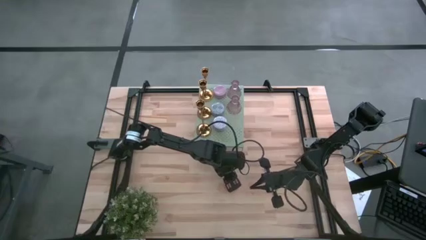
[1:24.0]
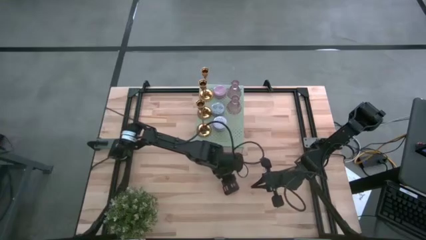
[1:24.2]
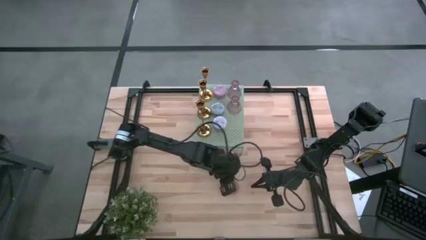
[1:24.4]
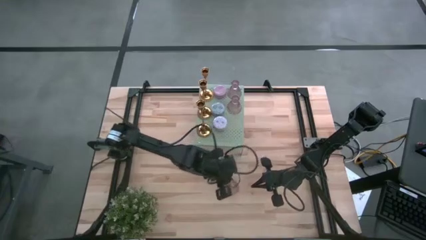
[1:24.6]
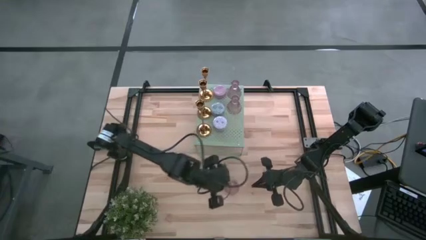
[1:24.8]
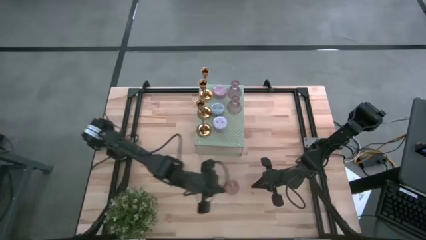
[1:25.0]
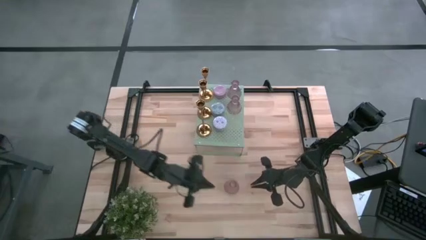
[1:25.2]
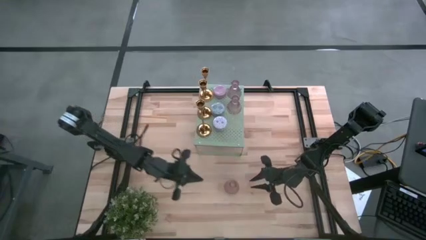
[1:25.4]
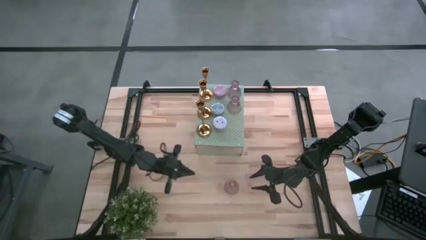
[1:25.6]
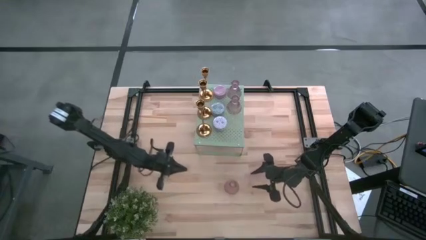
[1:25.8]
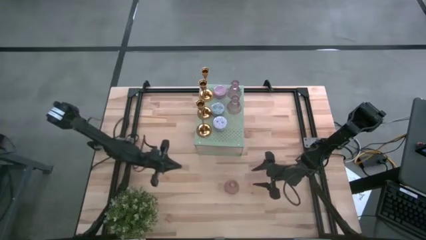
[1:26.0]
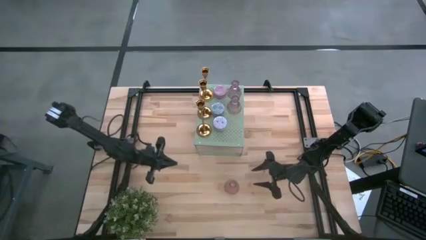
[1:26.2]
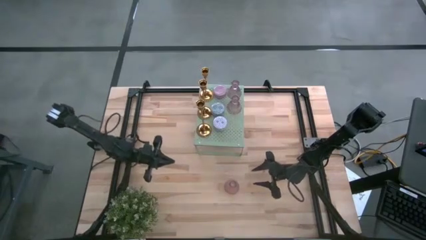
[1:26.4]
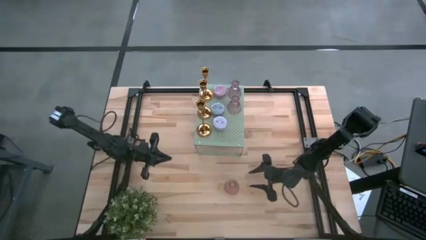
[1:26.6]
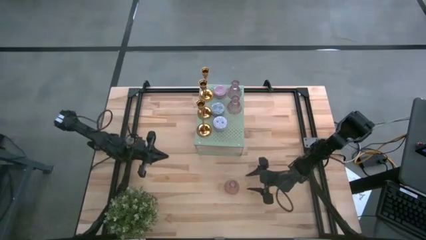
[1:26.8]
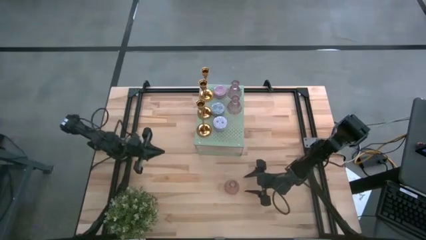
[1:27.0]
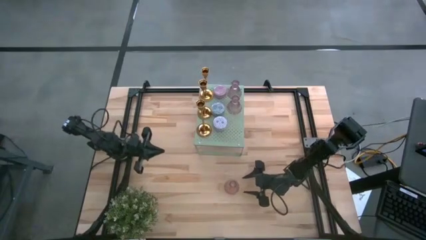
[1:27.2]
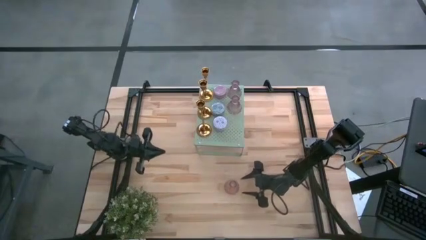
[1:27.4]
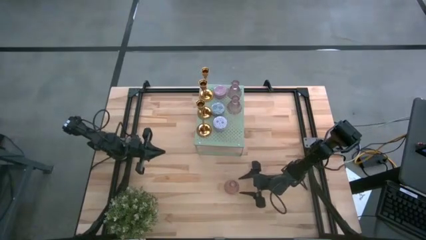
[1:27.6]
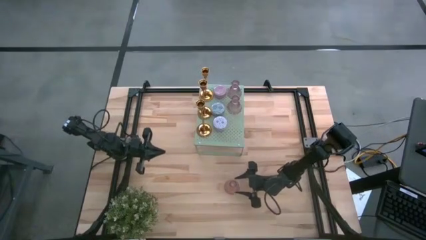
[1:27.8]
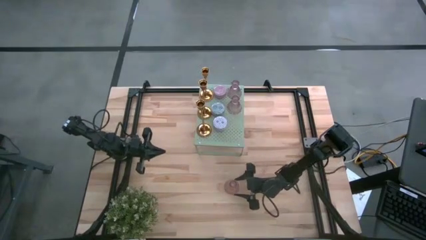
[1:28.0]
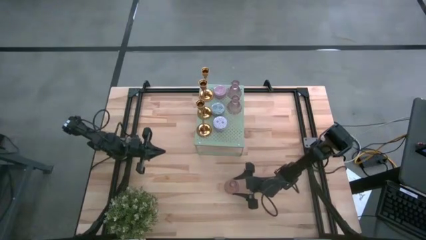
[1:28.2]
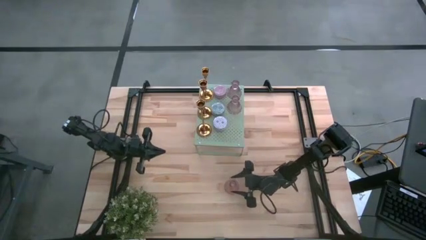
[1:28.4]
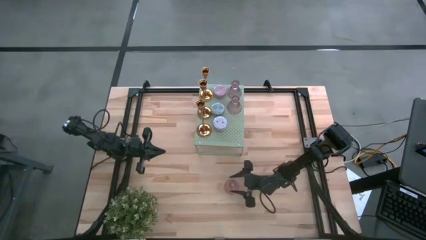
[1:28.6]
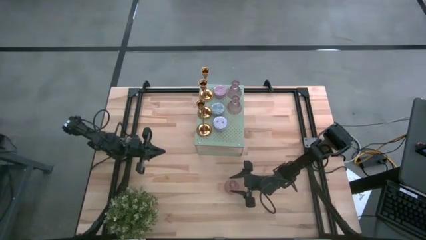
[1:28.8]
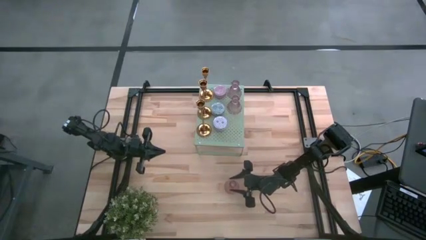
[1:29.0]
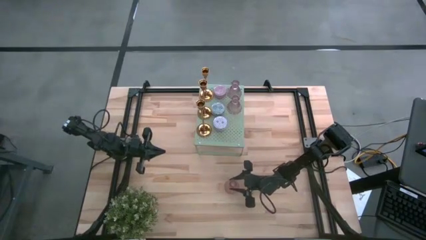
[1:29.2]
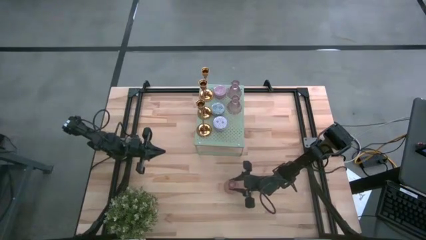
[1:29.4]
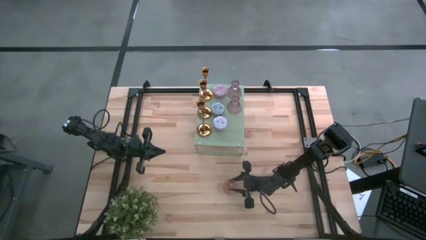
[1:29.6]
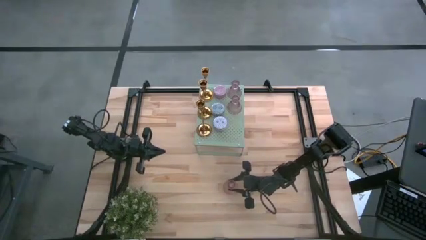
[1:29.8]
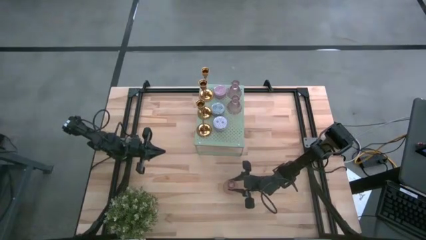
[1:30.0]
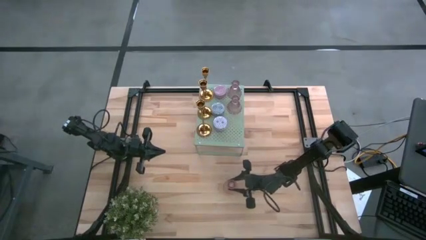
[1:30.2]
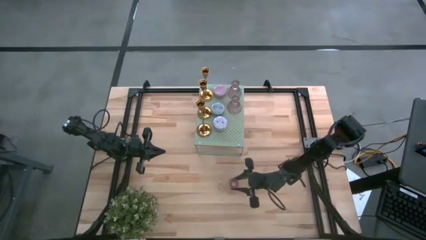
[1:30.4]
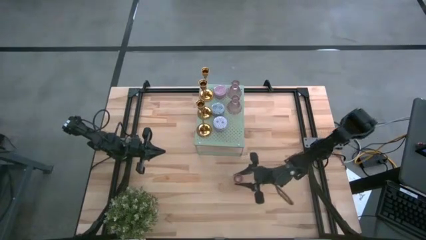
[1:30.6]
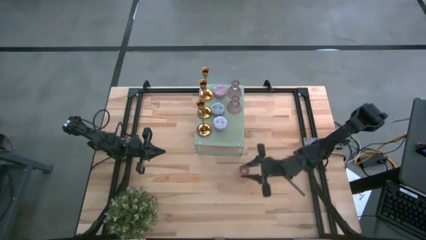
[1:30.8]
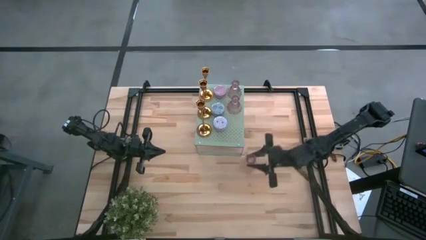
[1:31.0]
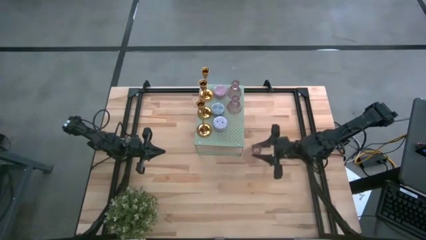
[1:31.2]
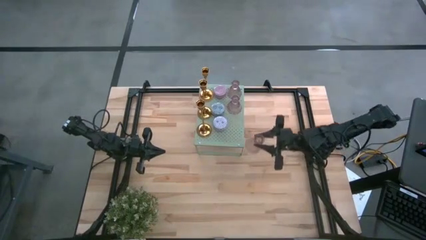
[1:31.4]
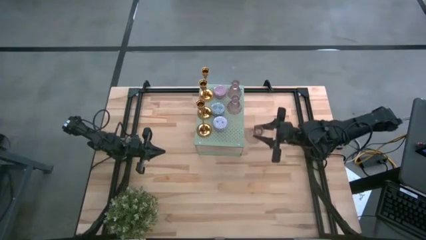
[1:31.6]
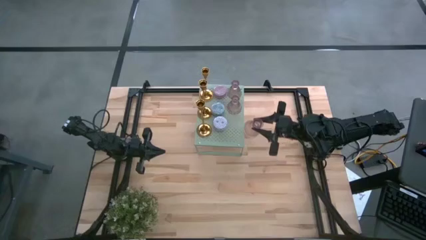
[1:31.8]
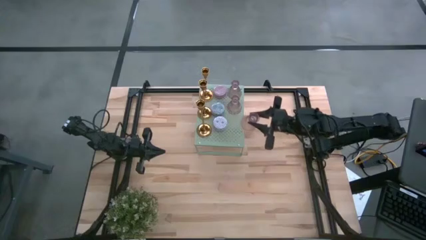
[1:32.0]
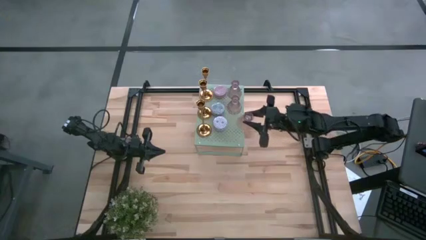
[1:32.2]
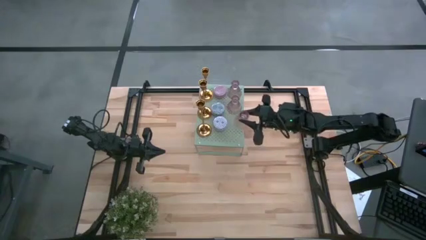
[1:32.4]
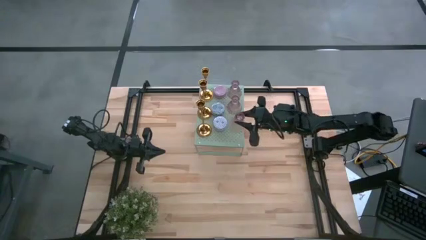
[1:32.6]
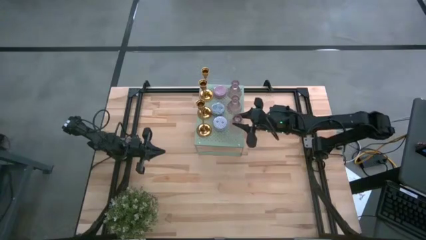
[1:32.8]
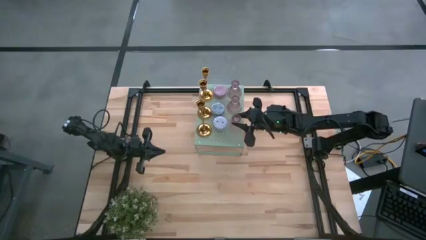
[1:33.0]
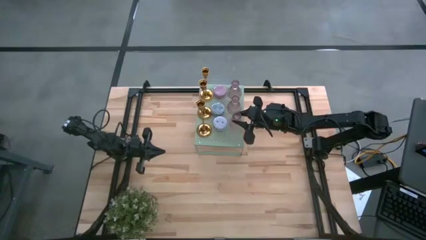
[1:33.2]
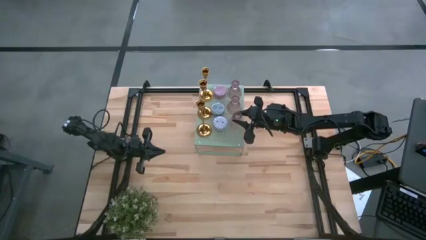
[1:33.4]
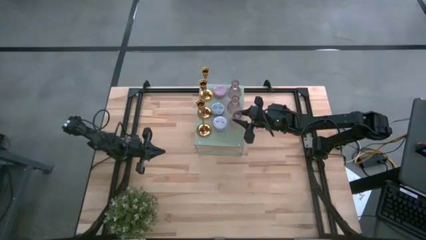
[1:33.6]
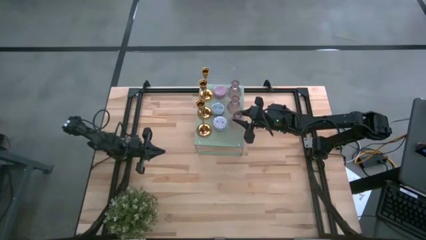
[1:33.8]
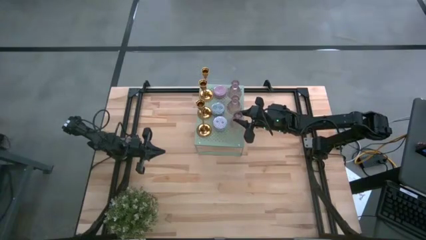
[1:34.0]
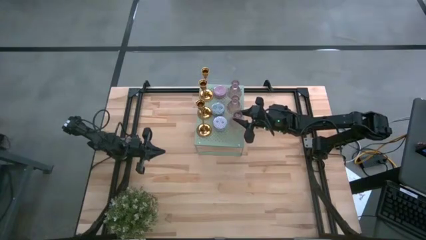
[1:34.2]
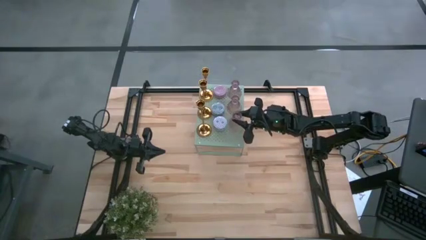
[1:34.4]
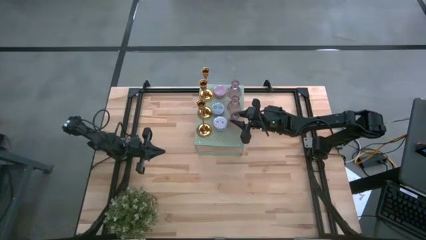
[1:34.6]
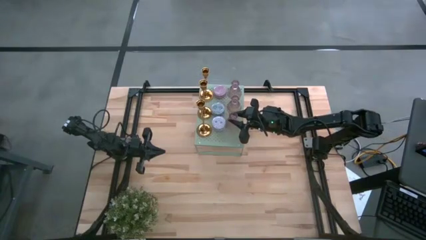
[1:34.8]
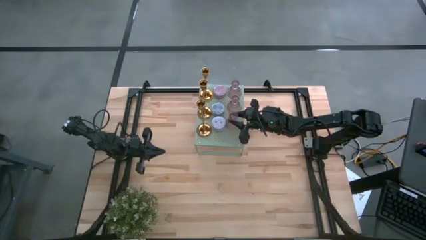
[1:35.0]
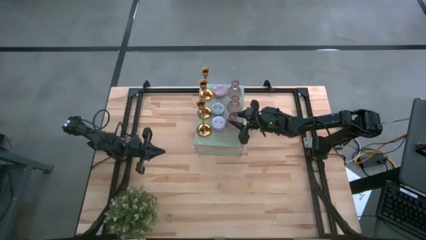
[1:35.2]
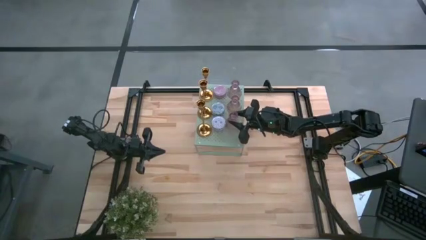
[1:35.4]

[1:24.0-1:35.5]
Task: Pick & Place candle stick holders
Put the pink glass candle holder on the shelf

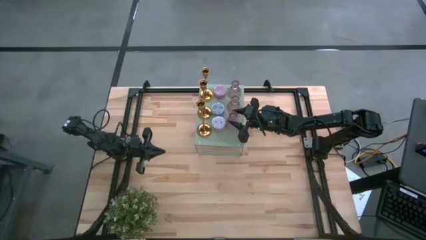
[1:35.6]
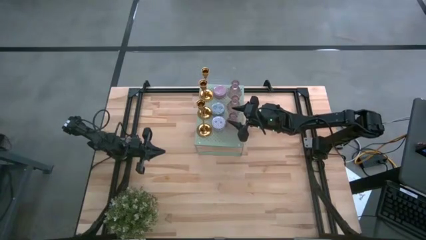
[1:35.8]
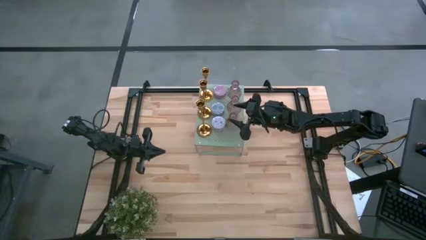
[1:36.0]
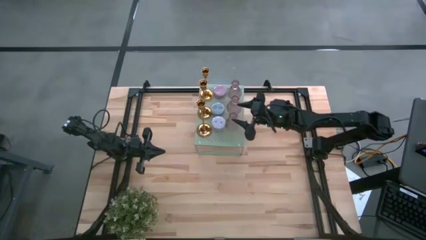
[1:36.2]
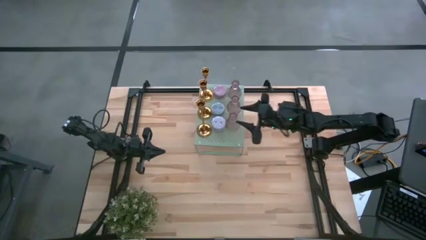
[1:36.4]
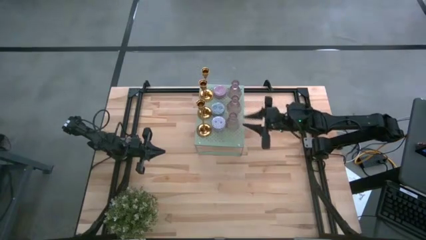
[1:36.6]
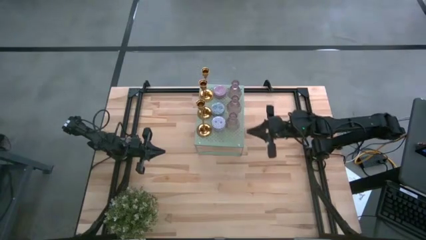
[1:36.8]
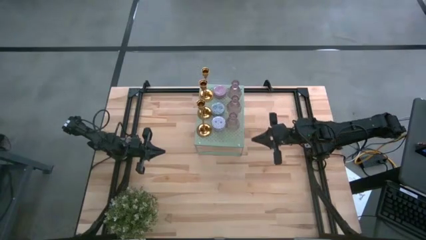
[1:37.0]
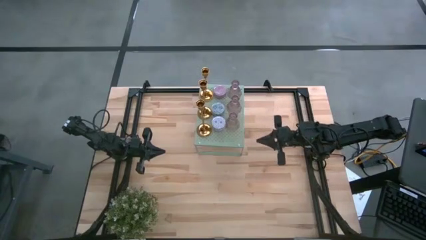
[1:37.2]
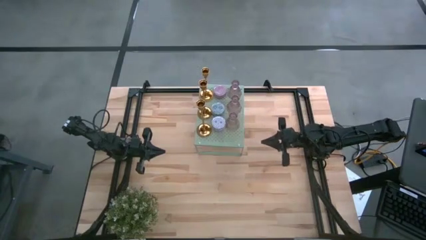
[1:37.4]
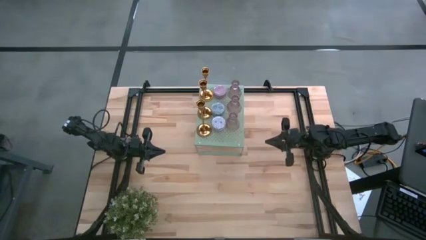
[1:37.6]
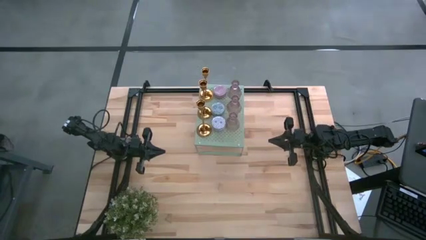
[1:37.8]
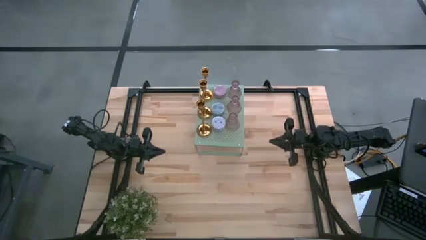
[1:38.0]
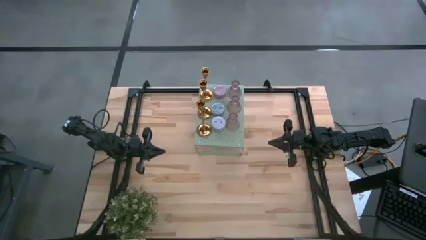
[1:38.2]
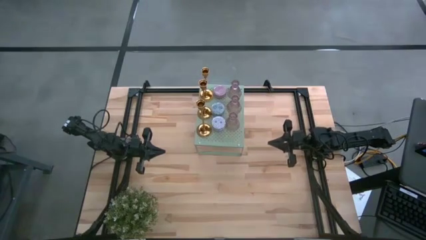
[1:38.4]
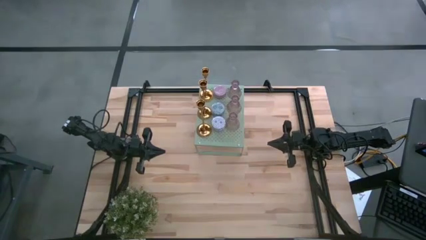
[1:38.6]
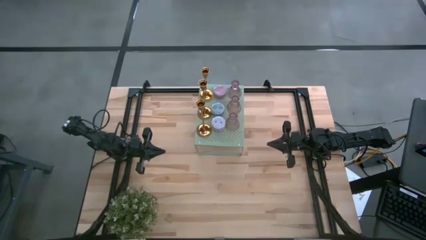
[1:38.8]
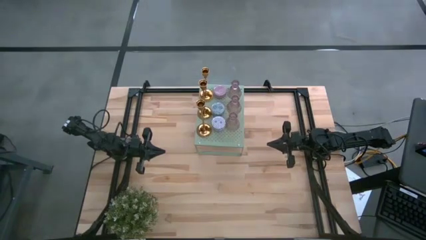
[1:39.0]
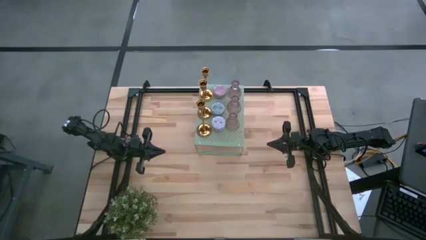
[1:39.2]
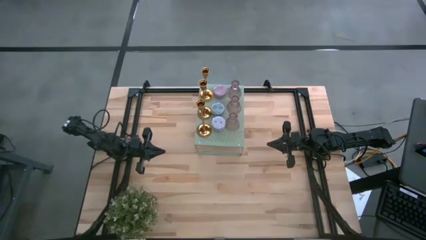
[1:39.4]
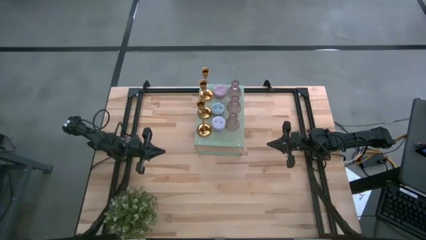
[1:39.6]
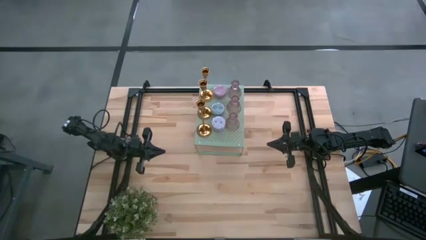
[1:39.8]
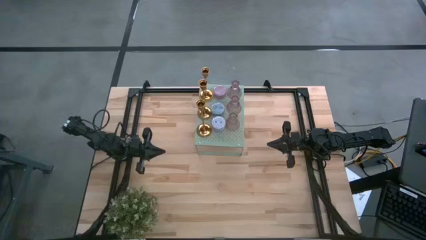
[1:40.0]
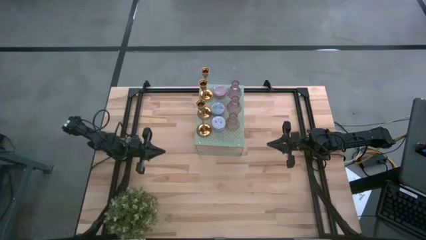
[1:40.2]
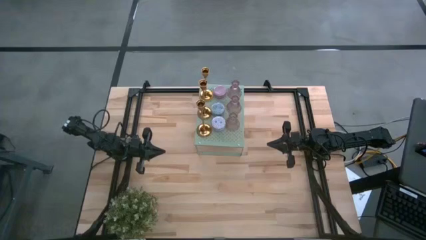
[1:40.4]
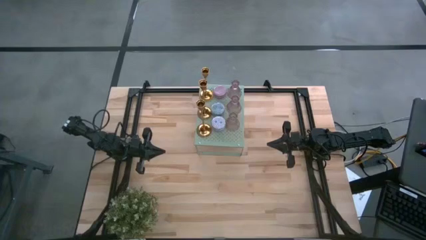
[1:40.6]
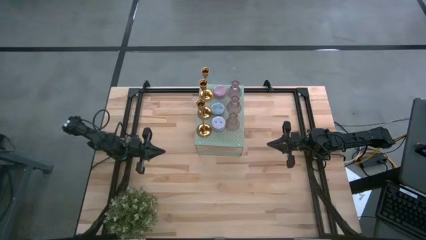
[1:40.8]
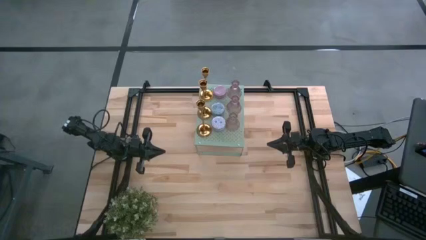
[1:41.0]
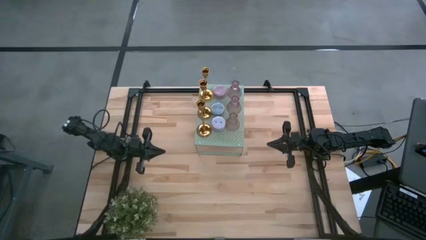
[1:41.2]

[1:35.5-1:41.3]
Return to Home Position
